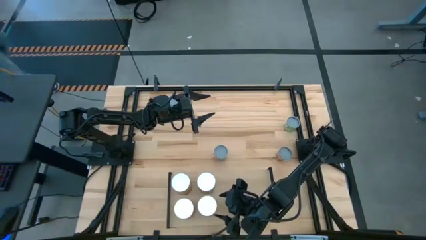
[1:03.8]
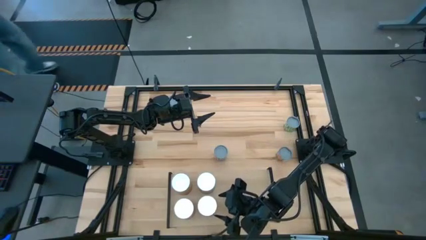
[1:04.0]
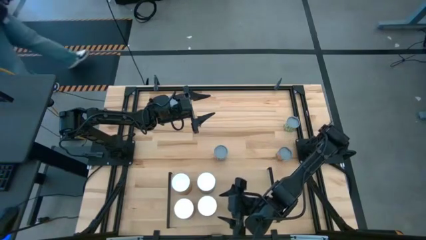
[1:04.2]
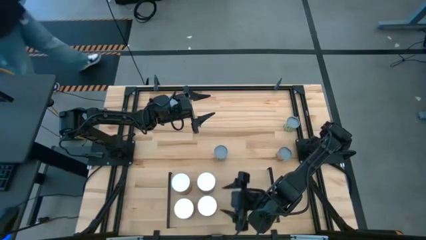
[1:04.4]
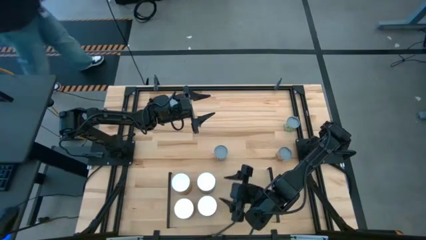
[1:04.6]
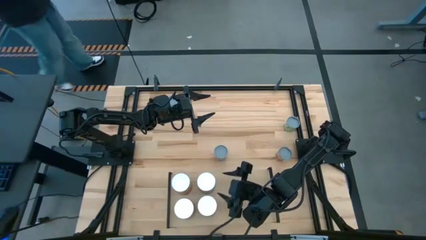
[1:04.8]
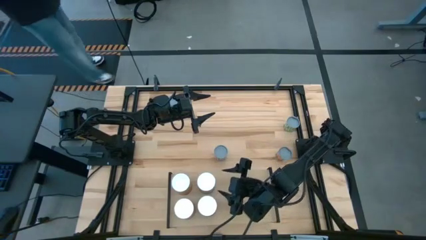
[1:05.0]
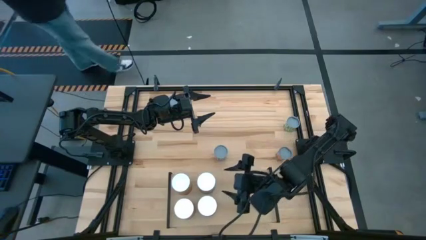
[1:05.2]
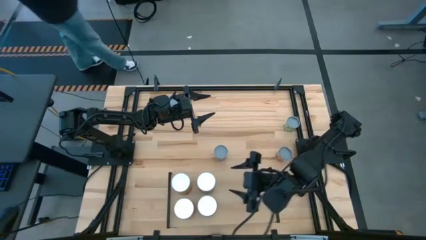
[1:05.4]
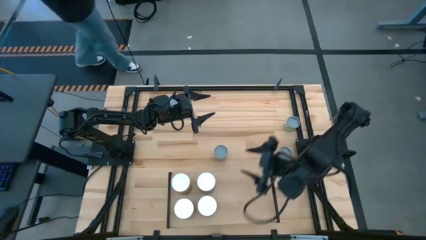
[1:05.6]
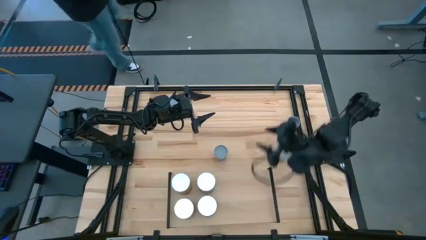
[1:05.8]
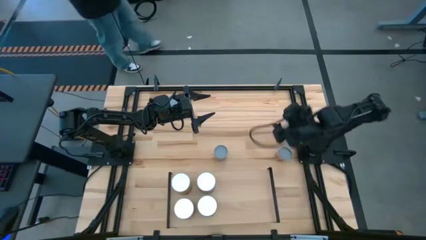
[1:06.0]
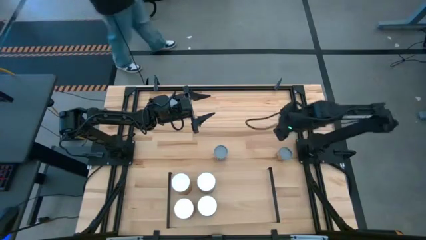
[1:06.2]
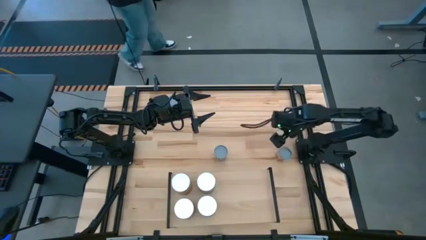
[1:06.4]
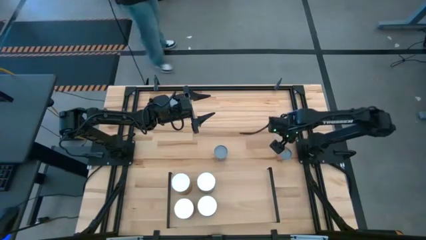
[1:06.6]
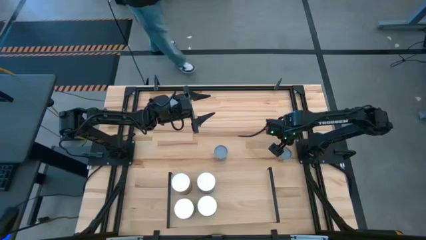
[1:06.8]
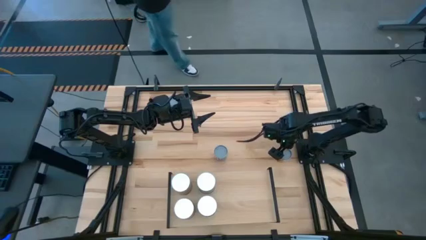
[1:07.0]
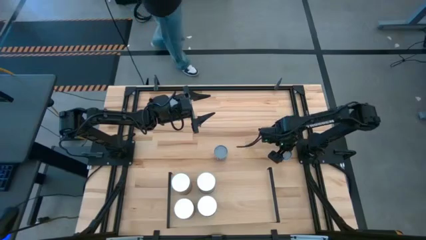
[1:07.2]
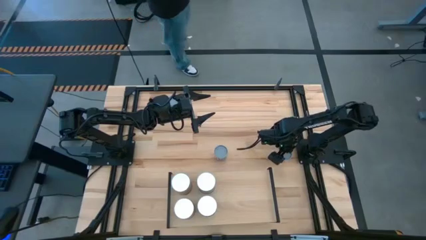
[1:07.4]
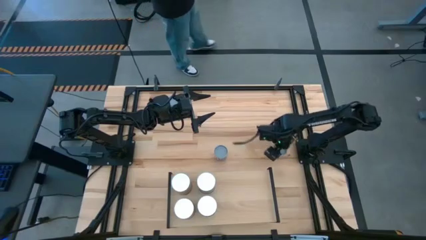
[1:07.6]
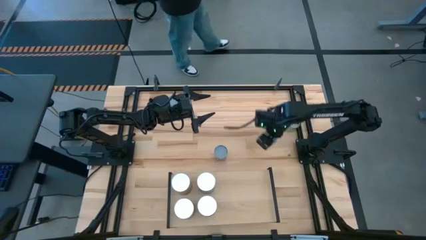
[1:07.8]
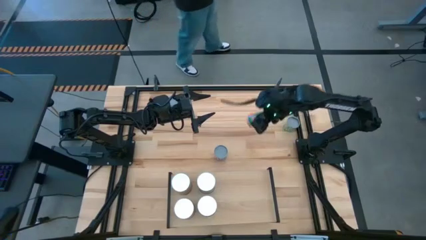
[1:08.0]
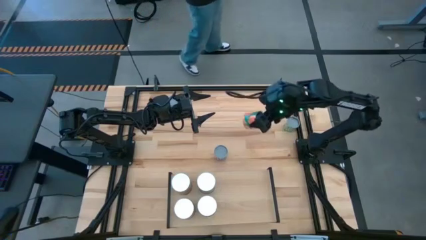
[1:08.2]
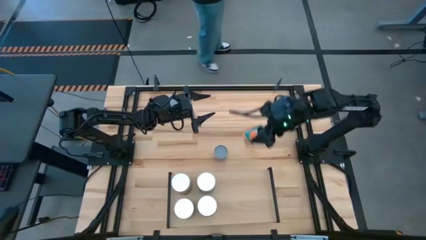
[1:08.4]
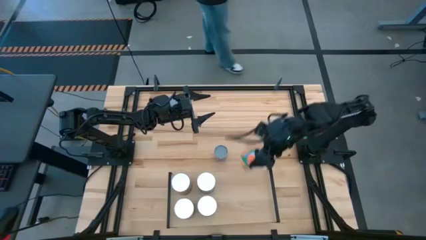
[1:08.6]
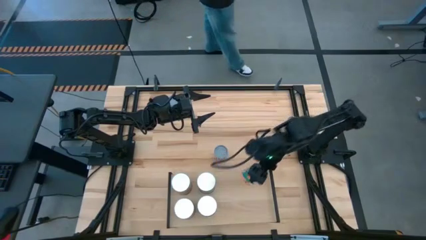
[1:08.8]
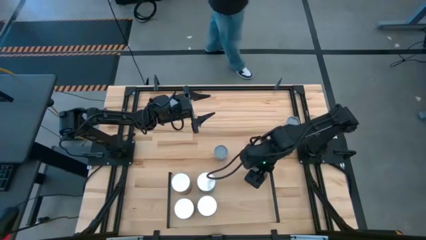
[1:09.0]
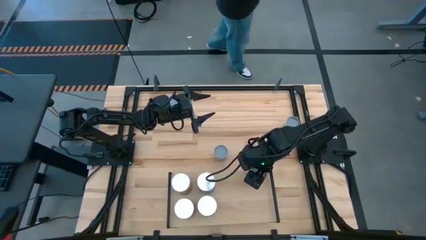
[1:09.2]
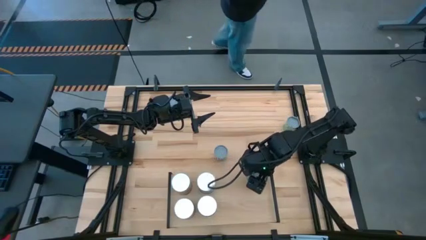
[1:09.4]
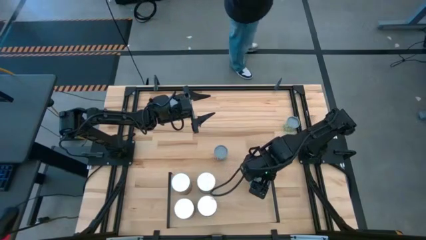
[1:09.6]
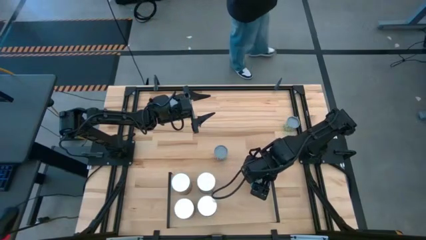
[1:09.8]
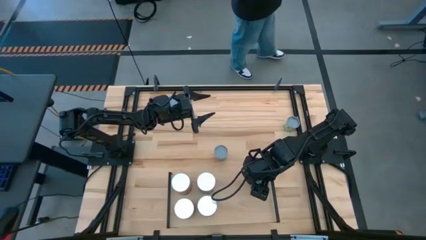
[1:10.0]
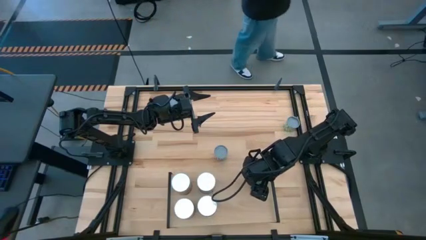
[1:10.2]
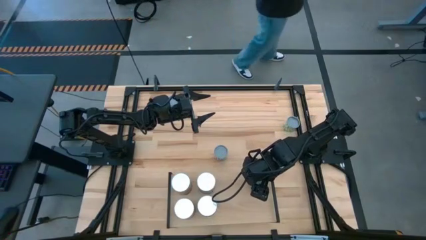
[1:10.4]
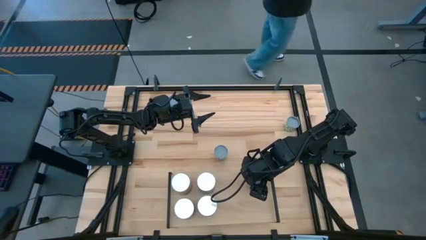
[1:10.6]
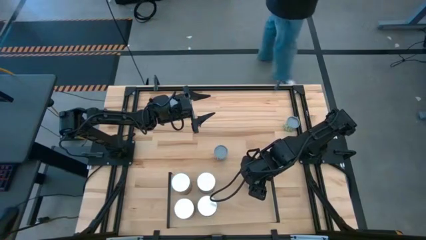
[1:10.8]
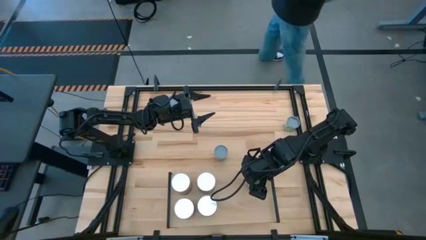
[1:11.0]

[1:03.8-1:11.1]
Task: Pick and place cans onto a shelf
Put the canned oranges on the shelf

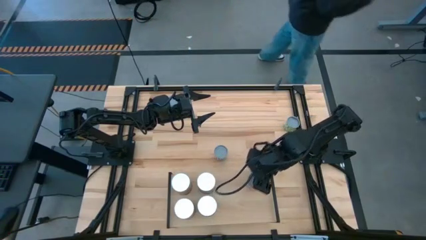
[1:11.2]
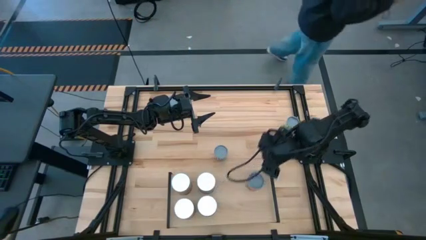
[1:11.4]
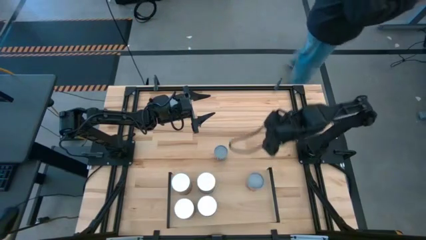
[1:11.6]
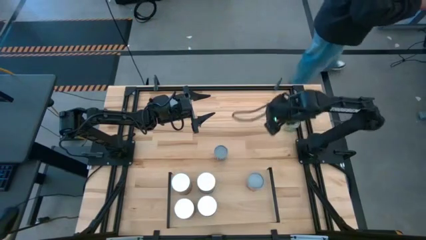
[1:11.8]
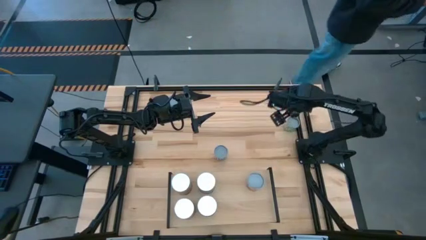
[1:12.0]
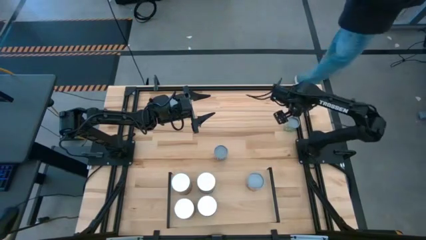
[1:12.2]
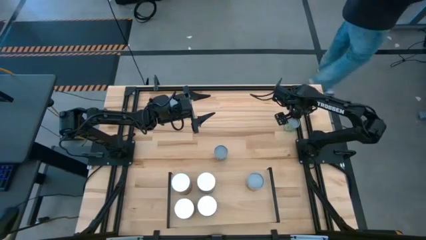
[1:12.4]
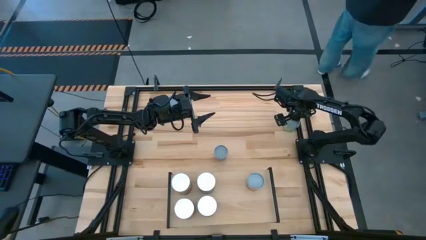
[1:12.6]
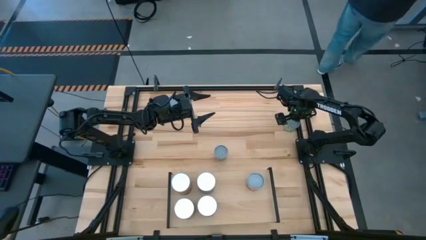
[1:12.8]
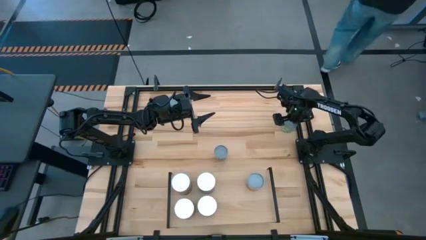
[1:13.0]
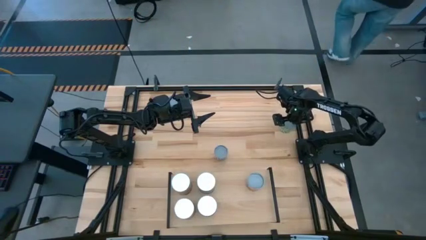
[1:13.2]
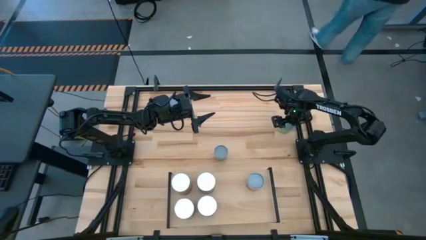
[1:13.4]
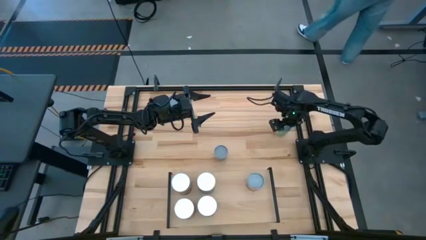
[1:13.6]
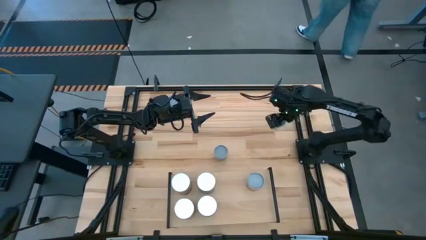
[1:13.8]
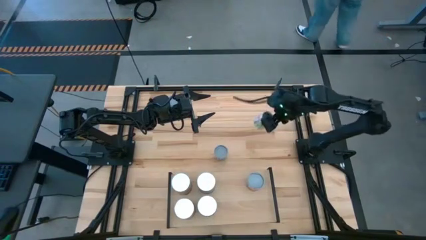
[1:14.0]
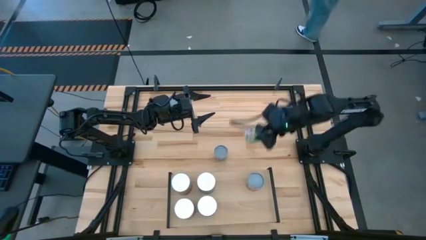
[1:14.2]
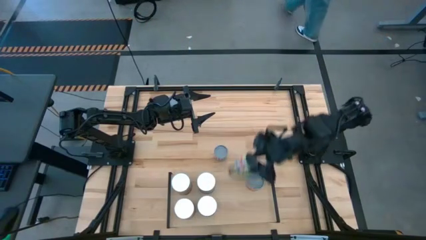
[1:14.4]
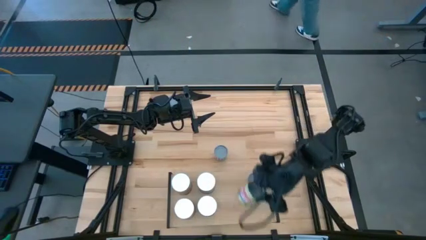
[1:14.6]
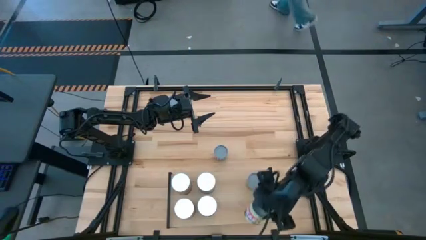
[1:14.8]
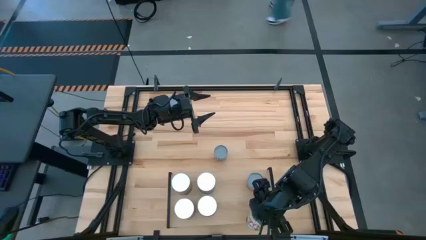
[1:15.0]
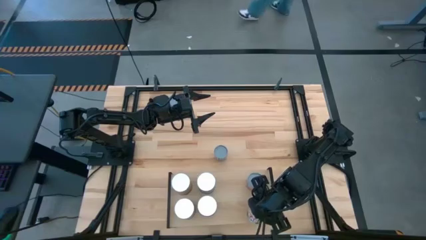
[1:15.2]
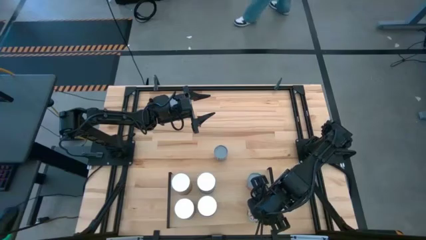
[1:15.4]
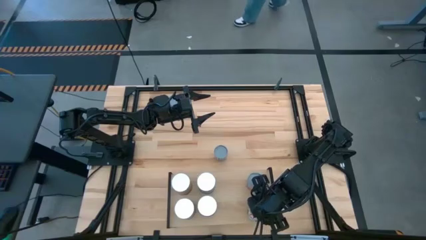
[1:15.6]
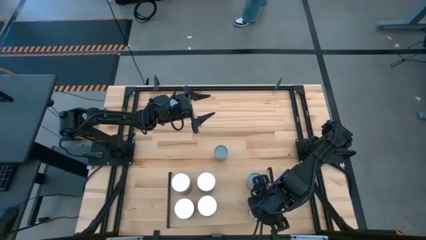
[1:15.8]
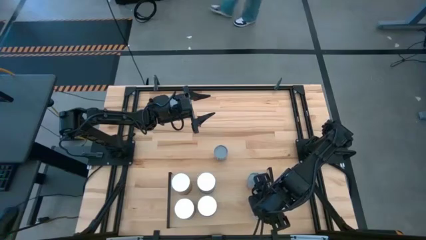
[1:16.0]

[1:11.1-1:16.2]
Put the canned peas on the shelf

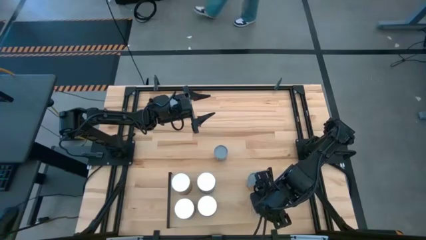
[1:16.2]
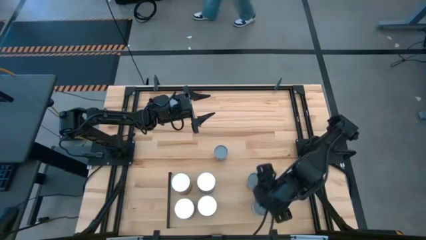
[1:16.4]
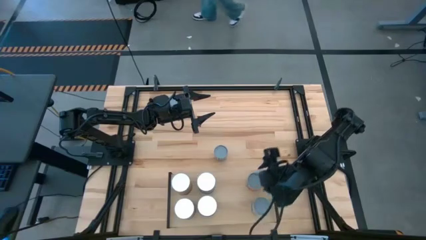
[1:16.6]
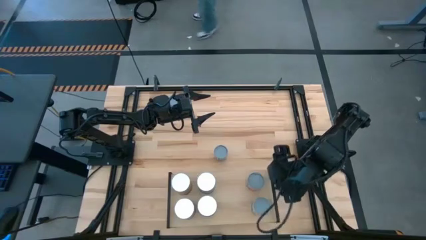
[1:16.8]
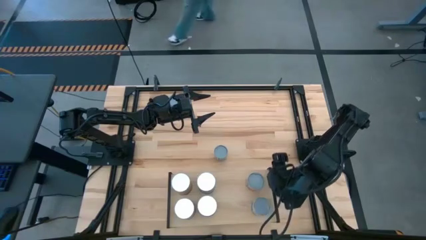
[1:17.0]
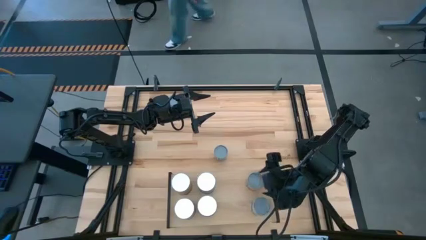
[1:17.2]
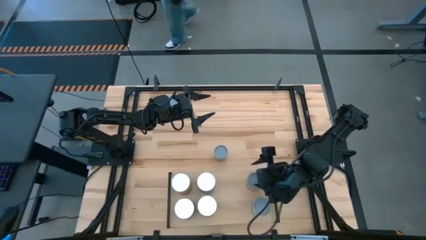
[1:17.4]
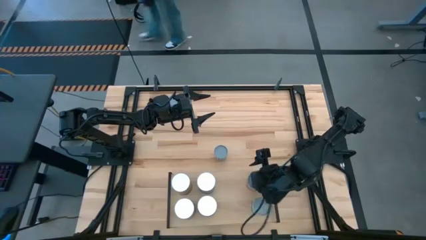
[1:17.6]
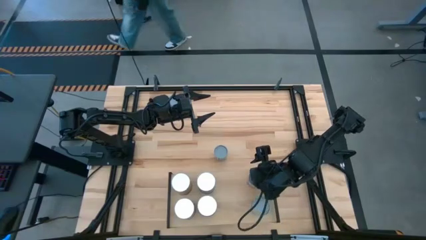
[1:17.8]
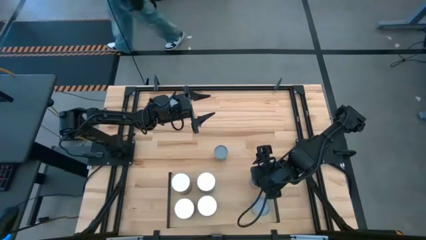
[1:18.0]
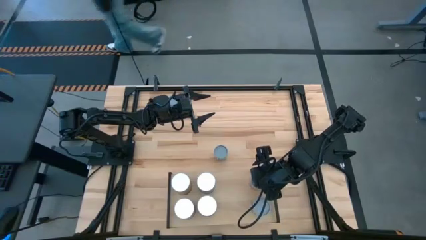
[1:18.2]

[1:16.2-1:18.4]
Adjust the canned oranges on the shelf

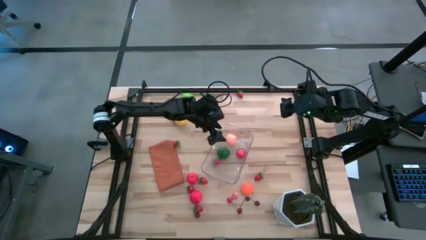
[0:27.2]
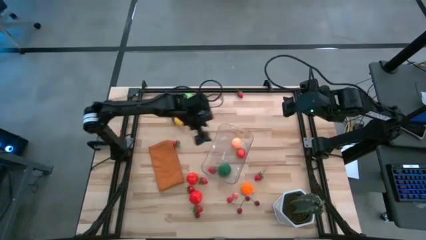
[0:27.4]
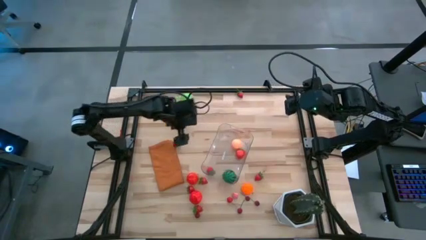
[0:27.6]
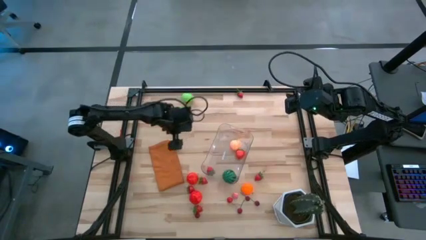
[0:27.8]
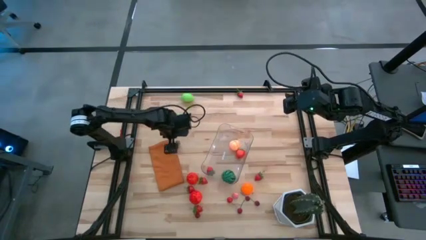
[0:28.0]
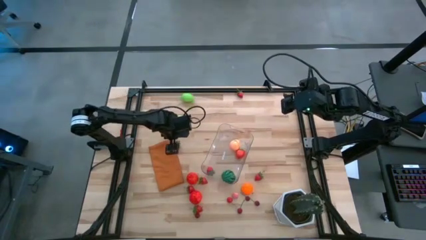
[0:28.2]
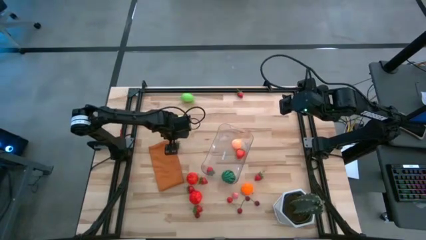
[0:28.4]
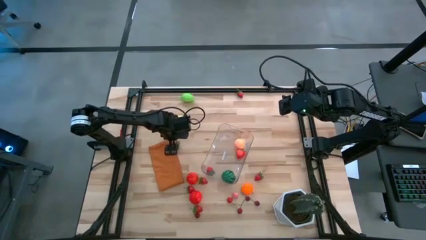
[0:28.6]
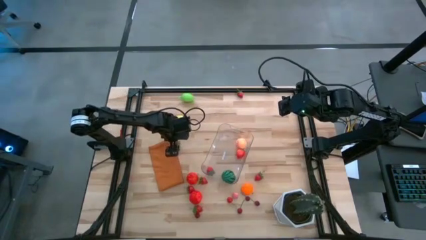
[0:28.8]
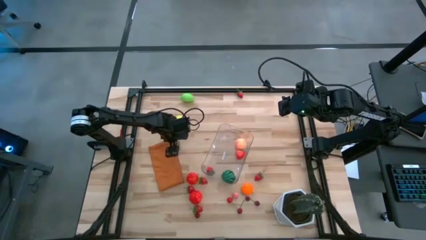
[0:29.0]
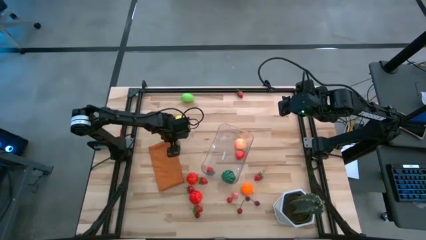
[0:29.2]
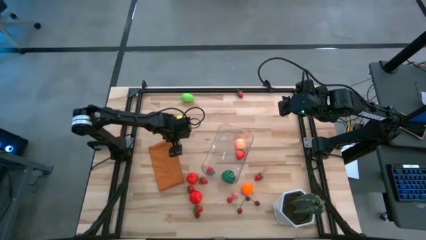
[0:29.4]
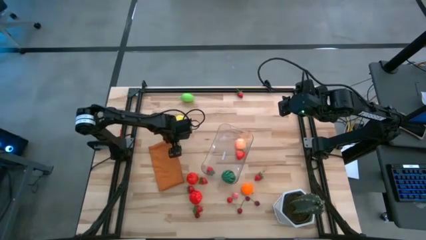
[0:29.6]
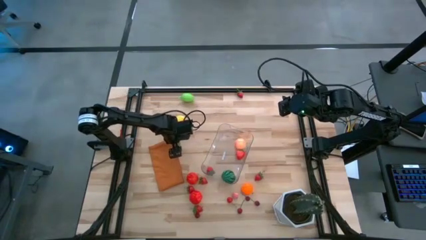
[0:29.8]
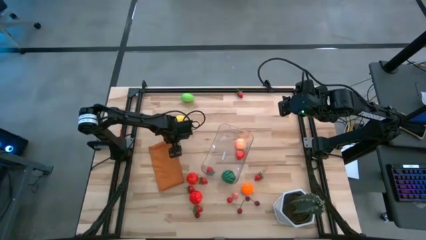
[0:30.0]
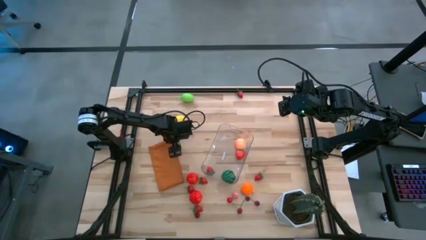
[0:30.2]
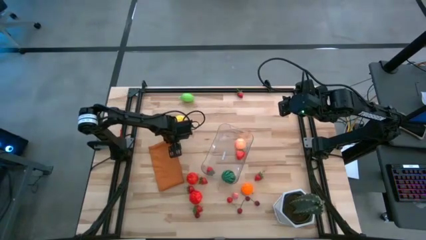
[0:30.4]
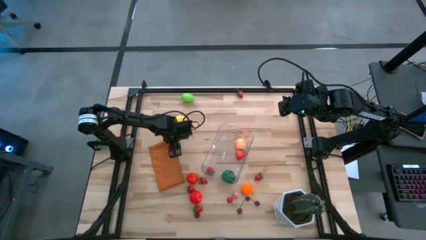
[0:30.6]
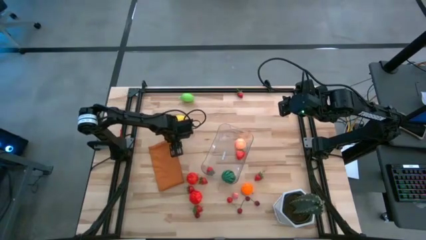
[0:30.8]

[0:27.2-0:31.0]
Task: Pick and placing Produce into tupperware
Put the red strawberry into the transparent bin
